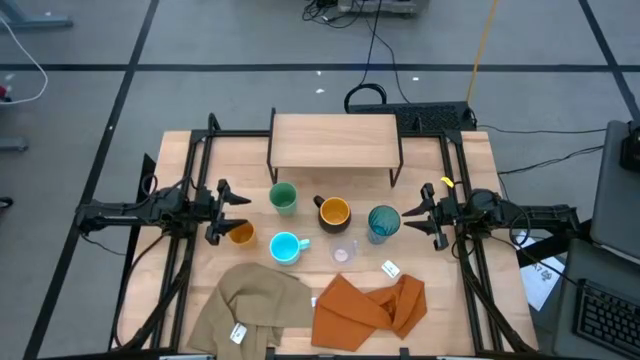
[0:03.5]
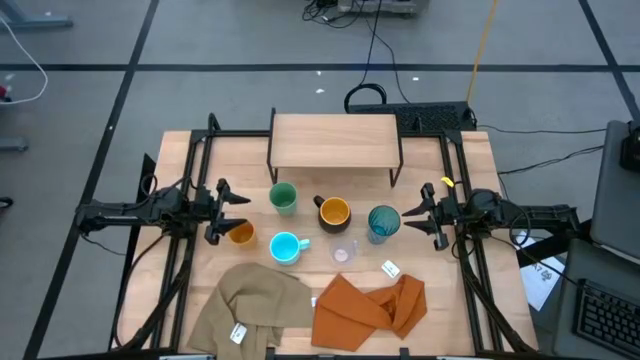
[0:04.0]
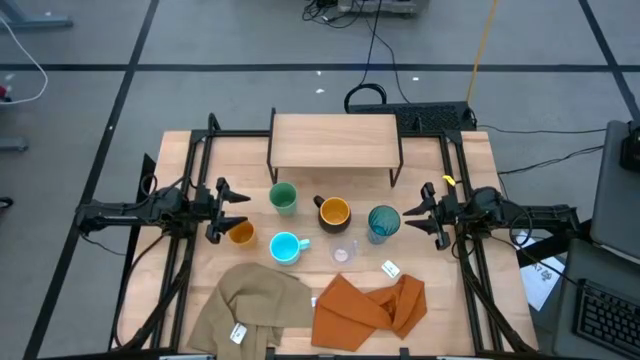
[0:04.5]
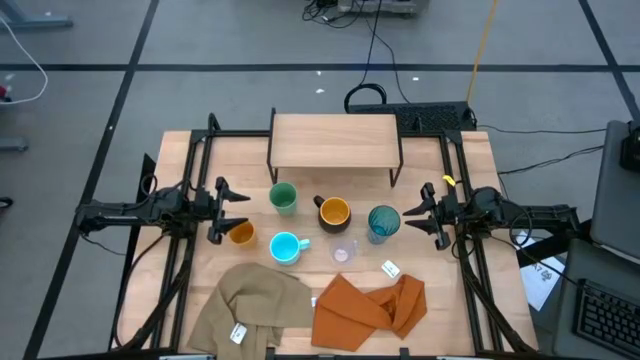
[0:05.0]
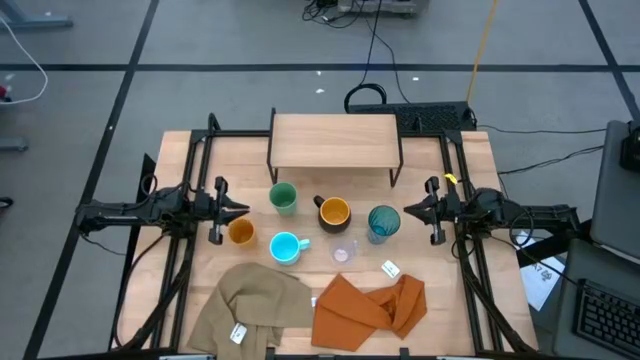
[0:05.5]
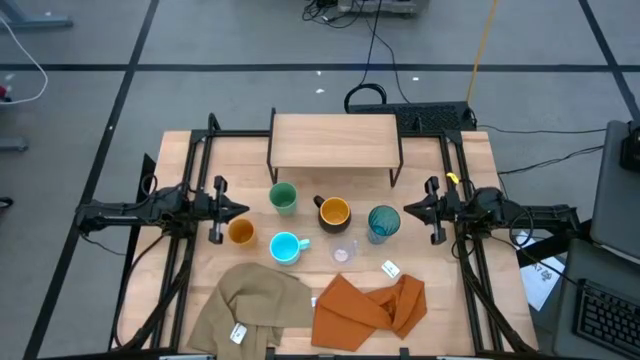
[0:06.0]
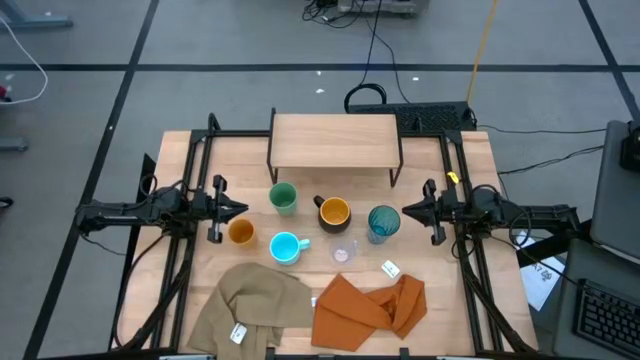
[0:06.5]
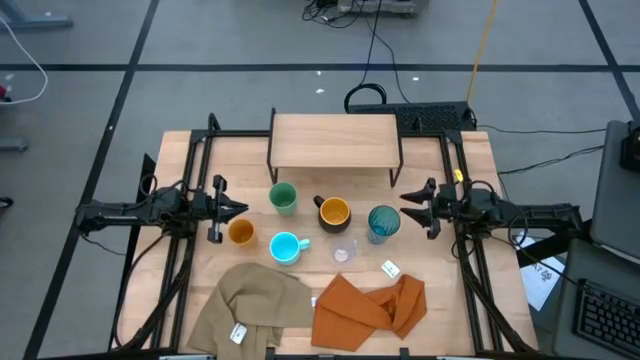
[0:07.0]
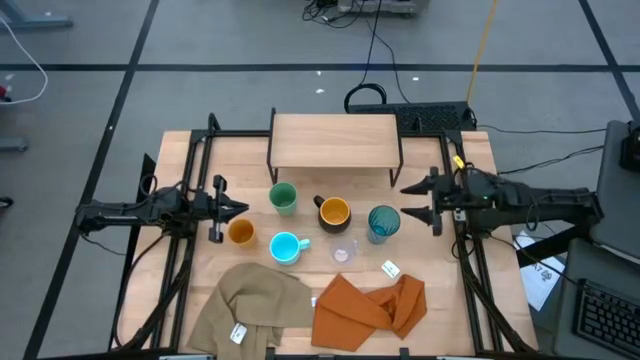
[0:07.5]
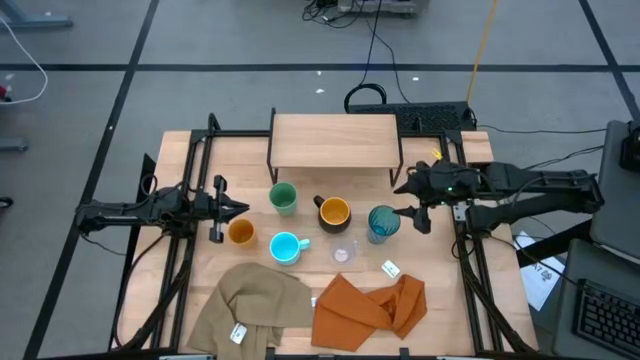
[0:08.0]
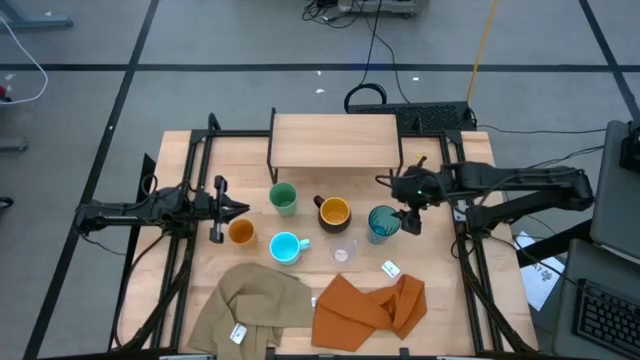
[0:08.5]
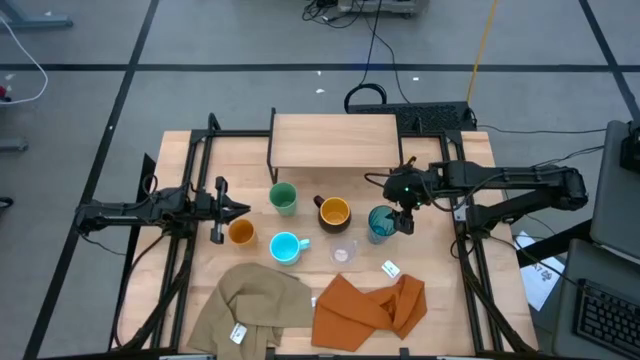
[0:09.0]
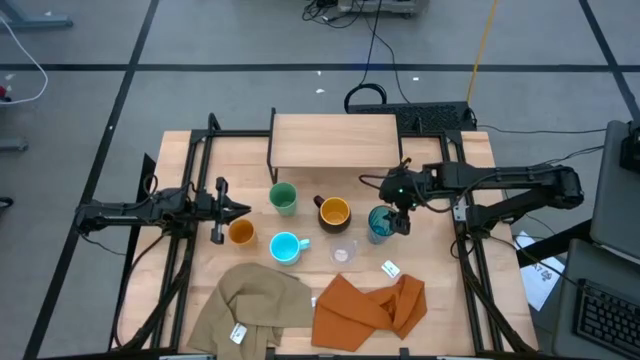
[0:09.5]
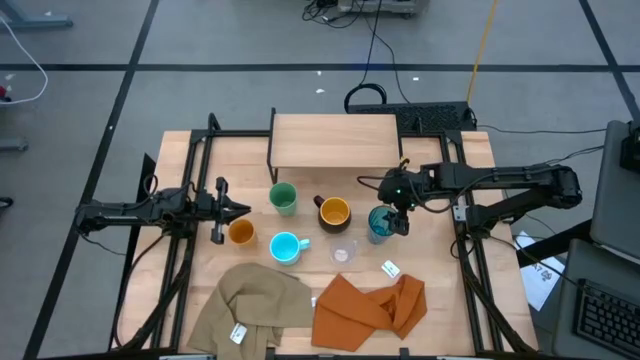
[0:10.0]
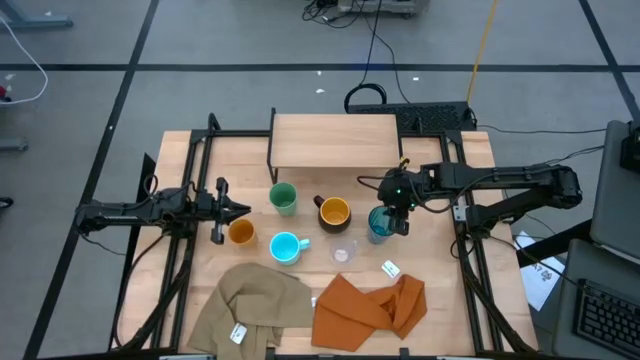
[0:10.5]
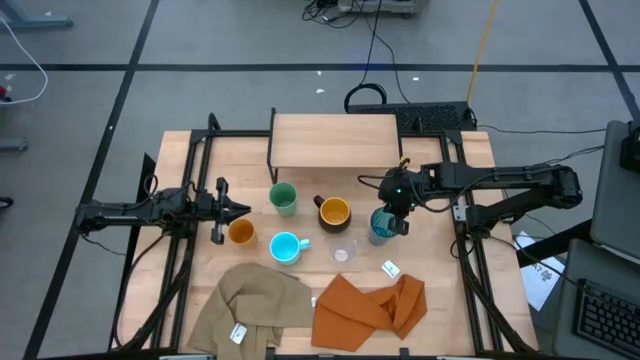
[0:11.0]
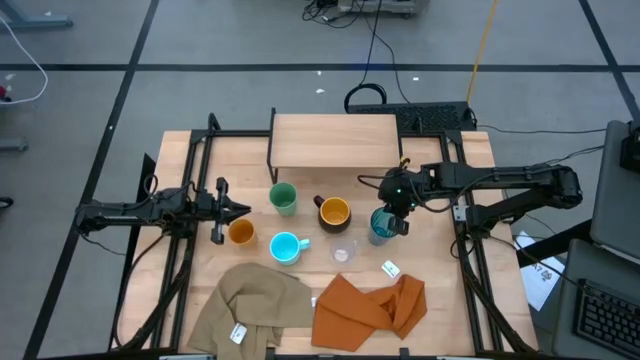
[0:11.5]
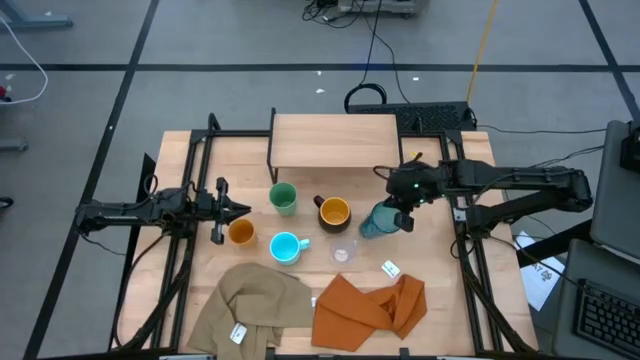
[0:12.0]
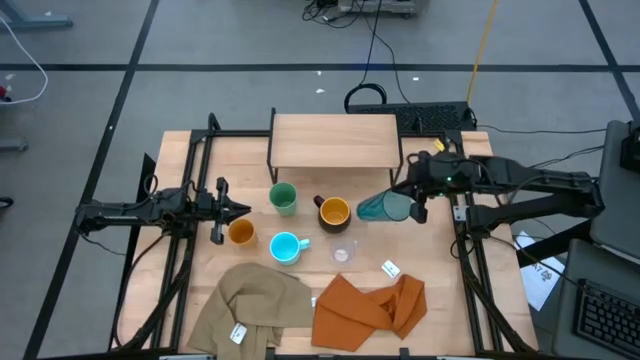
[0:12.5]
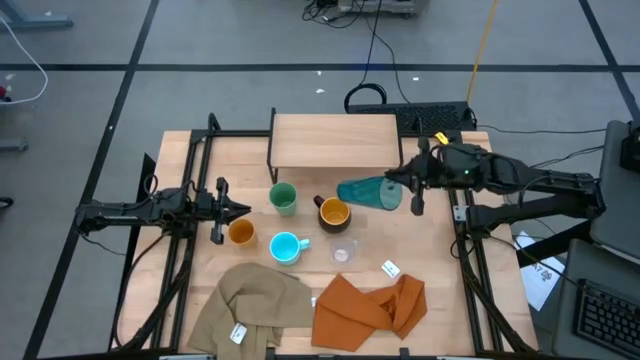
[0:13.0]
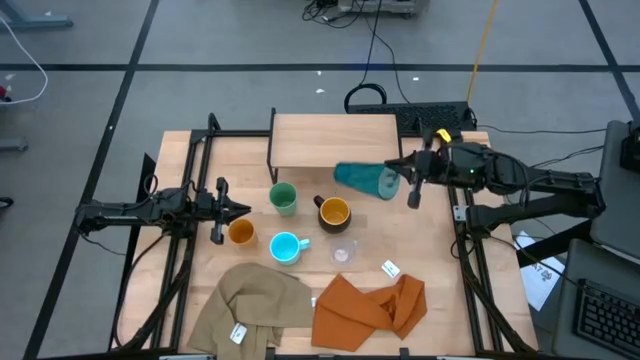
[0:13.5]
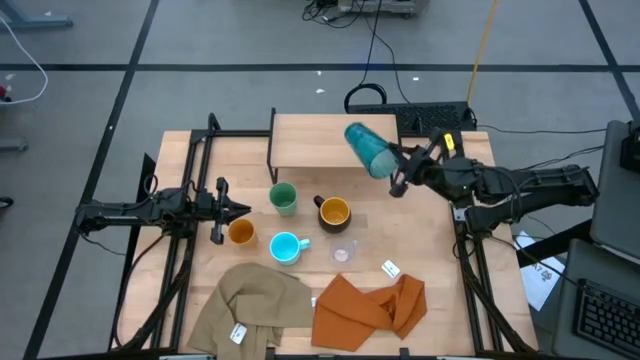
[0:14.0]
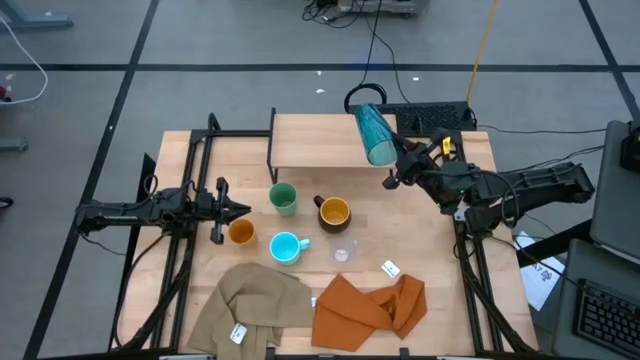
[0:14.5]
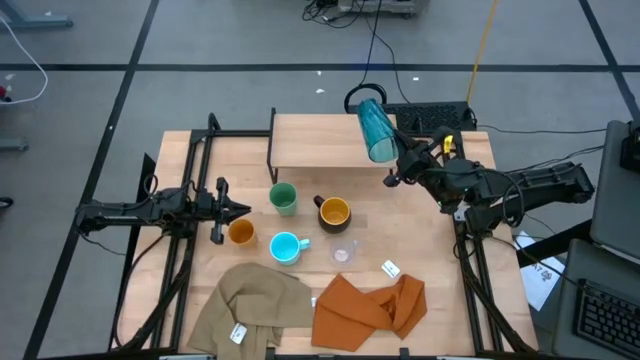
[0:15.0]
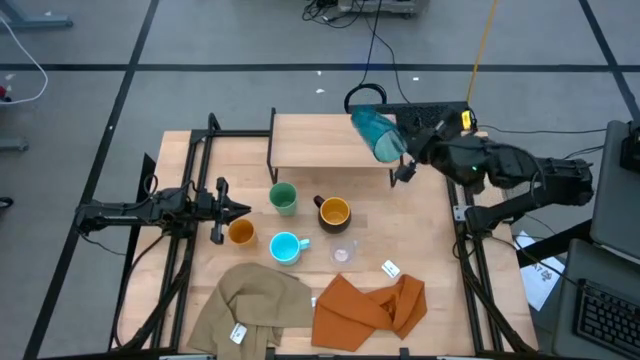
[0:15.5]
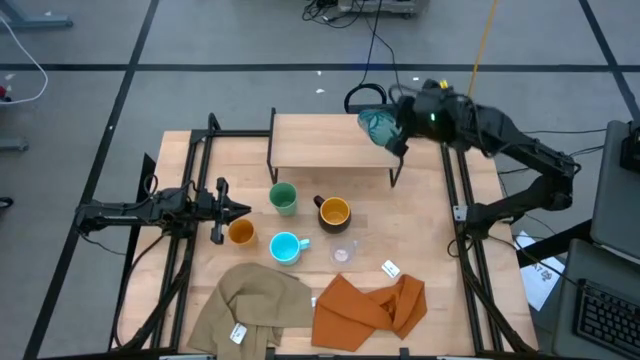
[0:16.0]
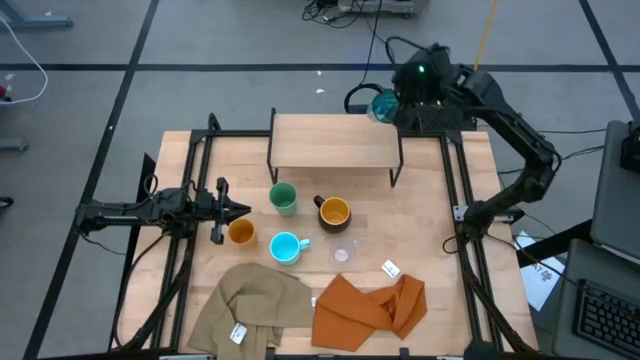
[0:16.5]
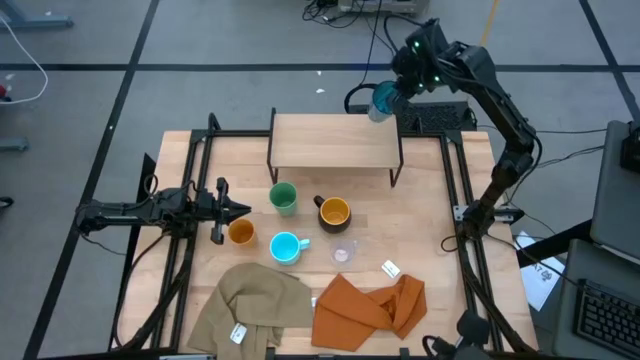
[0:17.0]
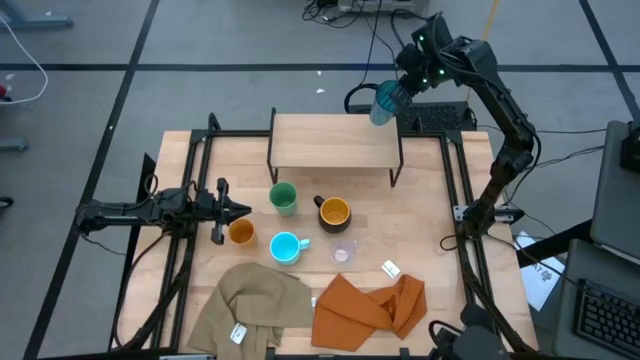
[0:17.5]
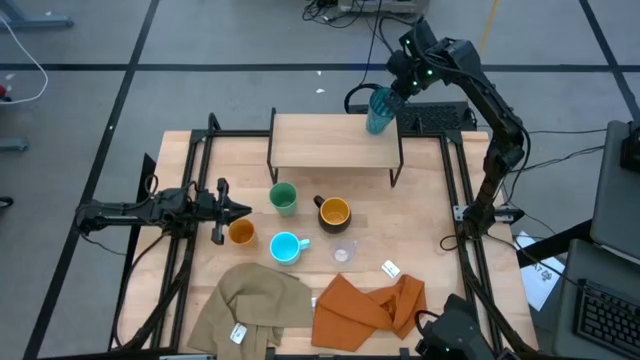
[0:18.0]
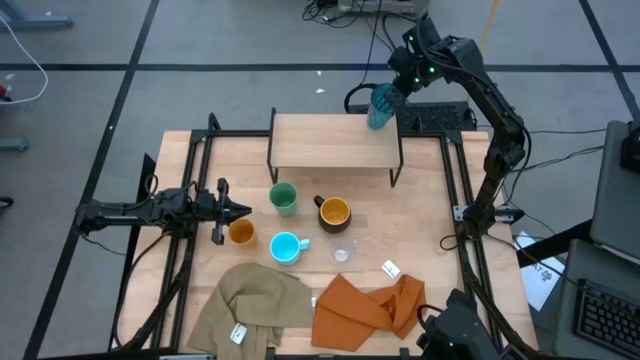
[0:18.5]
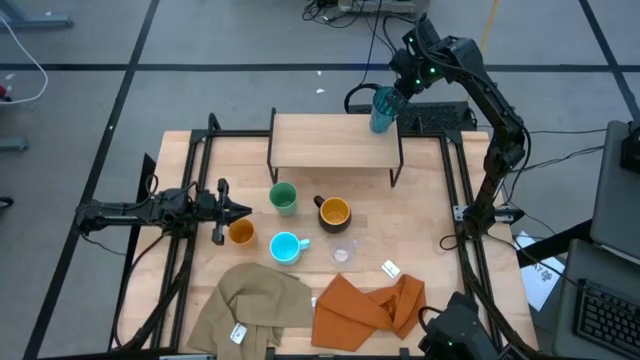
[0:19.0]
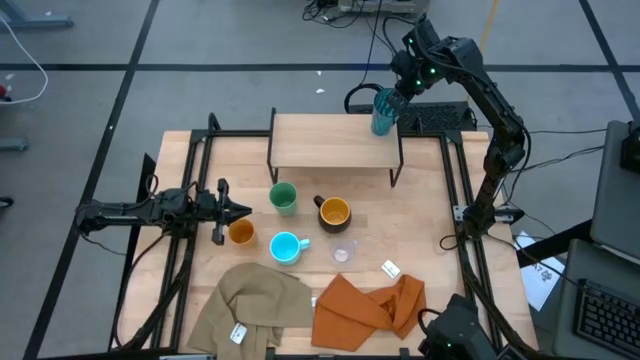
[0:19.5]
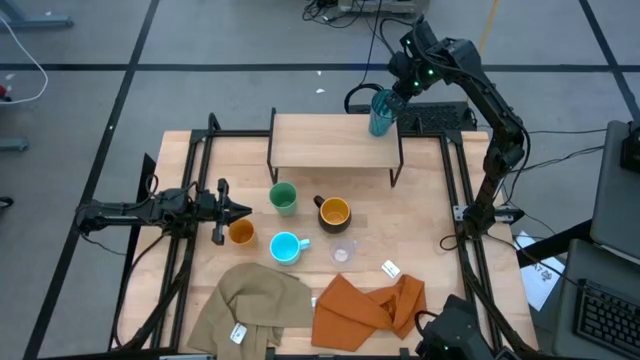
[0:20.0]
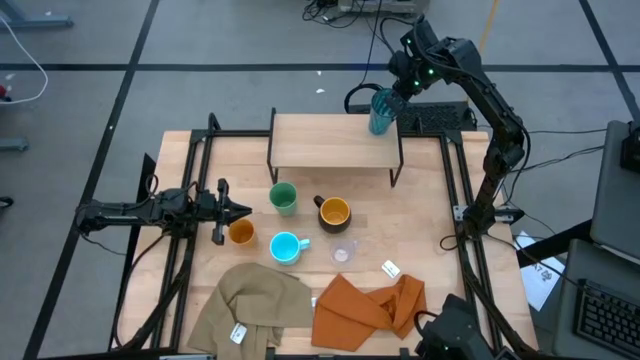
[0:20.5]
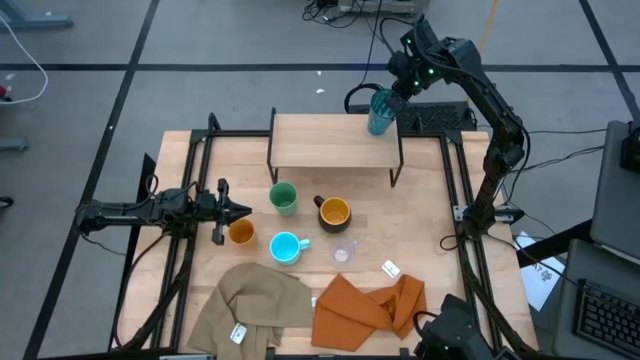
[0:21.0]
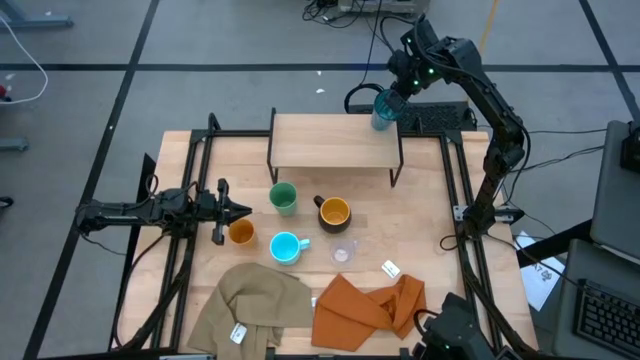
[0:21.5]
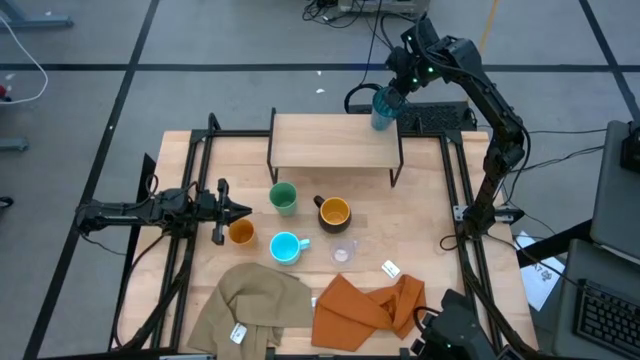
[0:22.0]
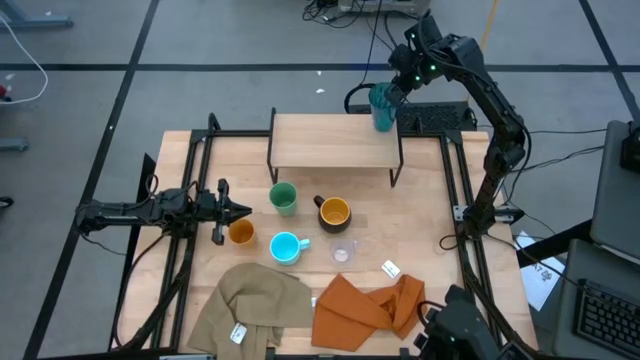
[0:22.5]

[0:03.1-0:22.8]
Task: Stack small to large cups/mugs on shelf
Put the blue cup on the shelf
